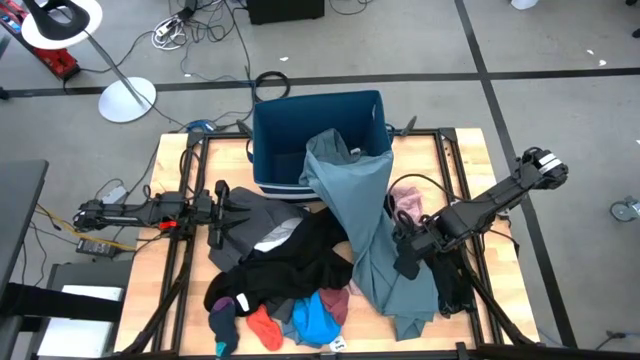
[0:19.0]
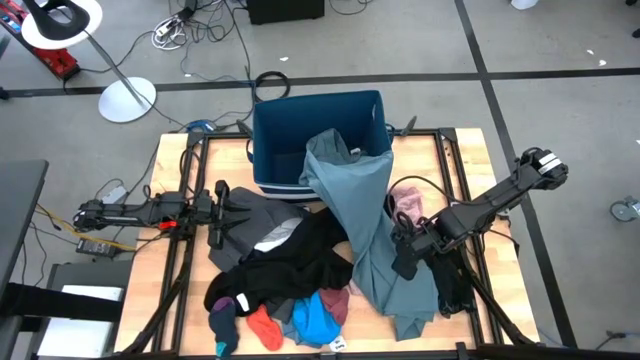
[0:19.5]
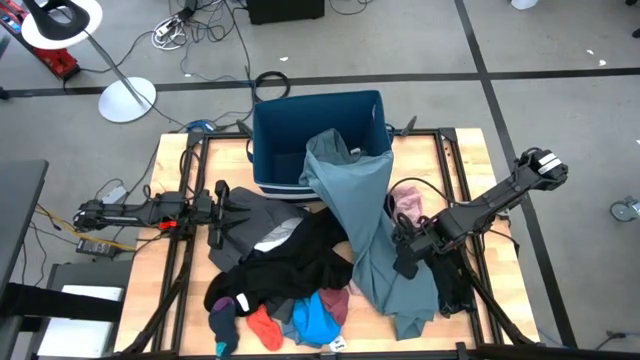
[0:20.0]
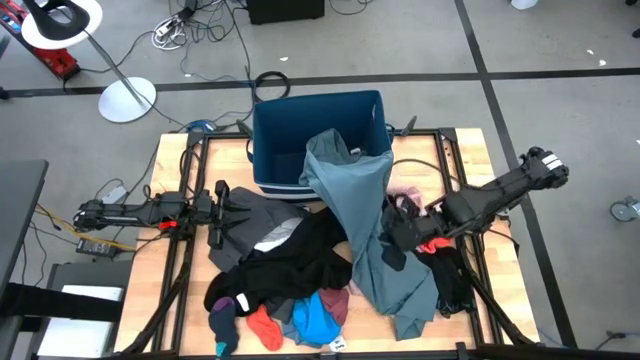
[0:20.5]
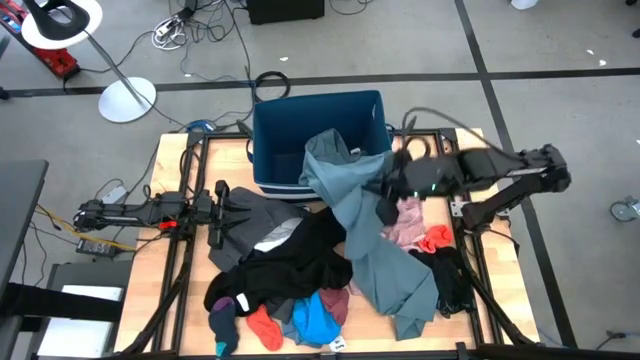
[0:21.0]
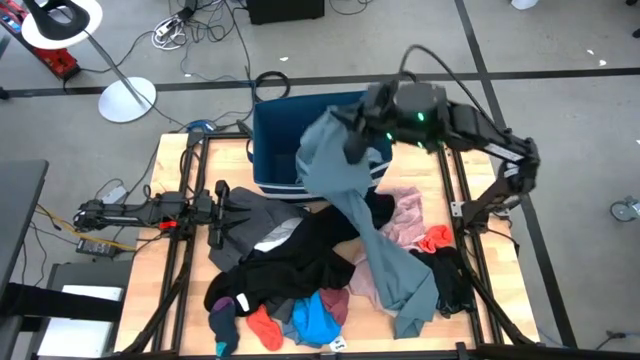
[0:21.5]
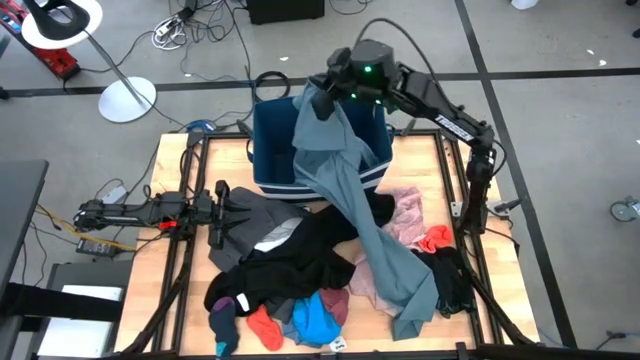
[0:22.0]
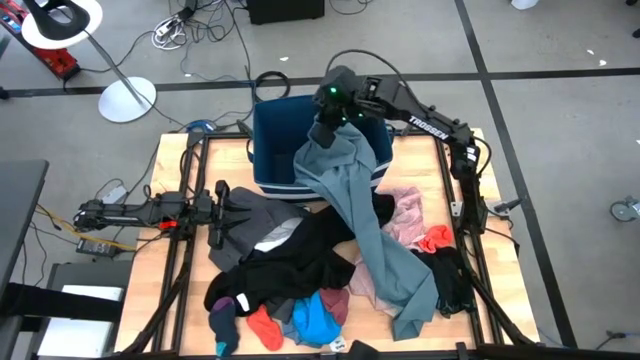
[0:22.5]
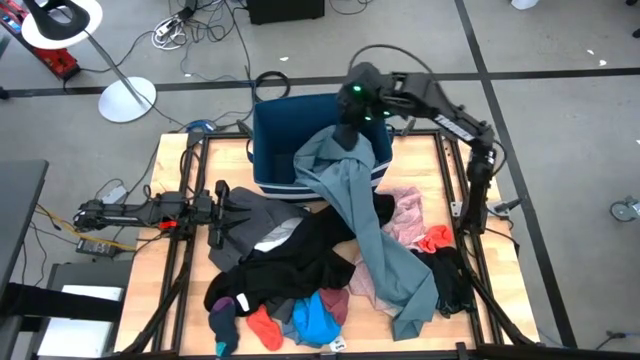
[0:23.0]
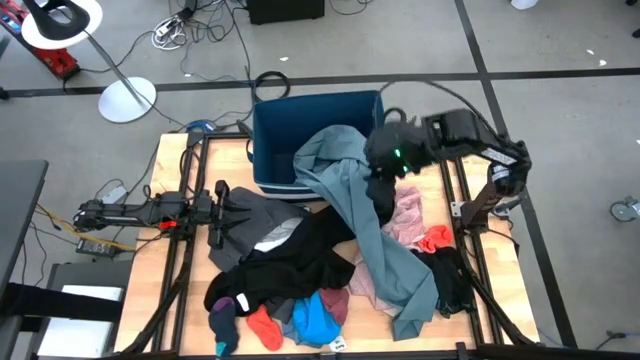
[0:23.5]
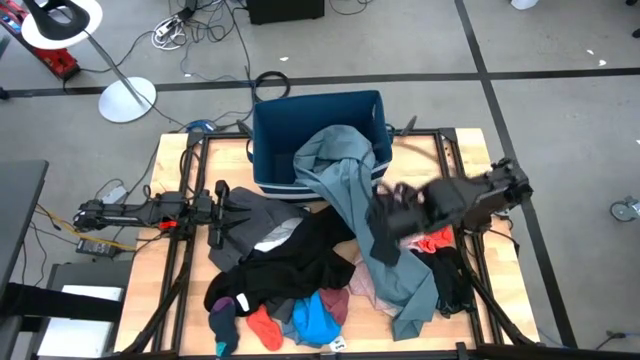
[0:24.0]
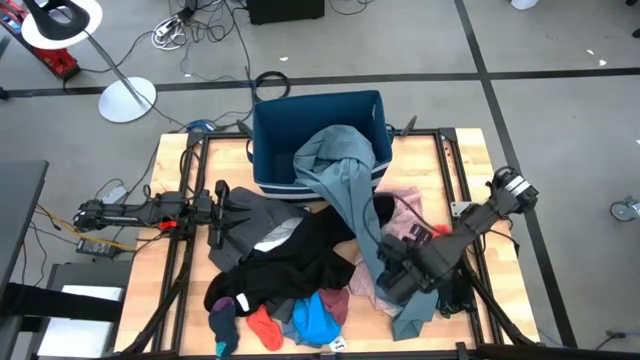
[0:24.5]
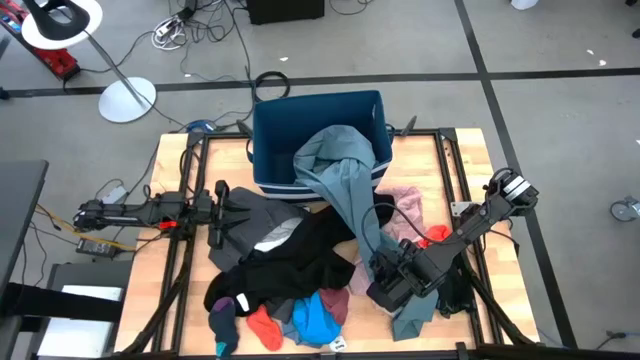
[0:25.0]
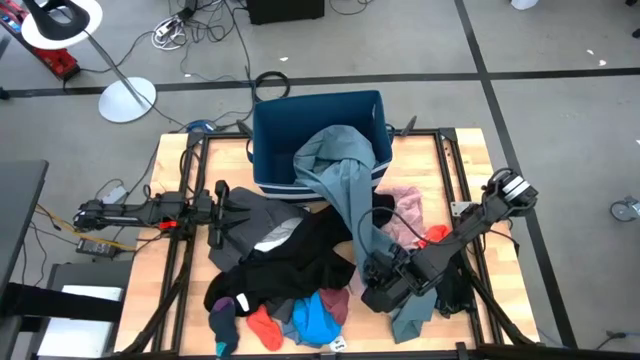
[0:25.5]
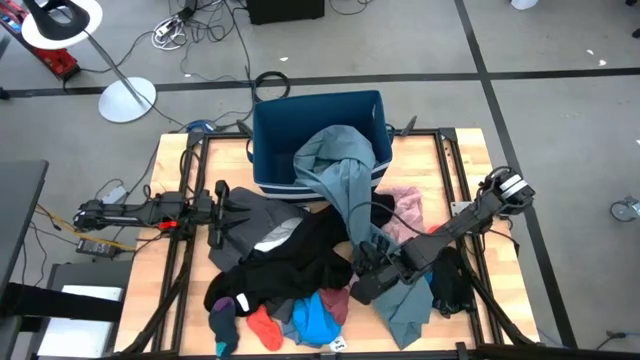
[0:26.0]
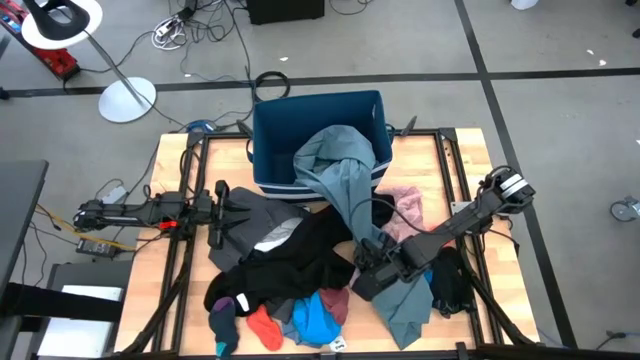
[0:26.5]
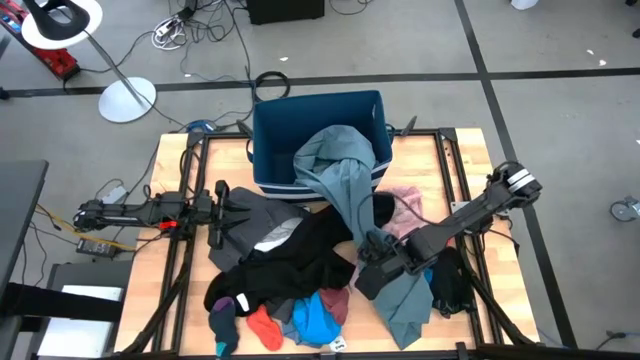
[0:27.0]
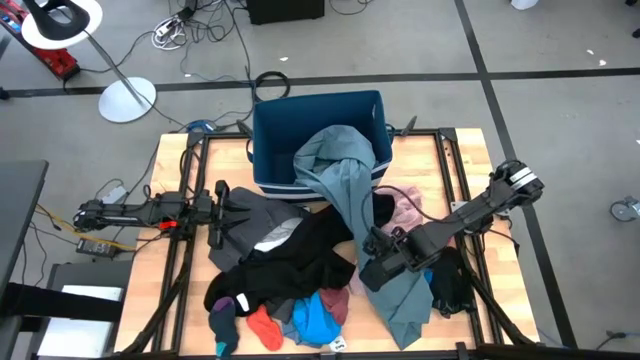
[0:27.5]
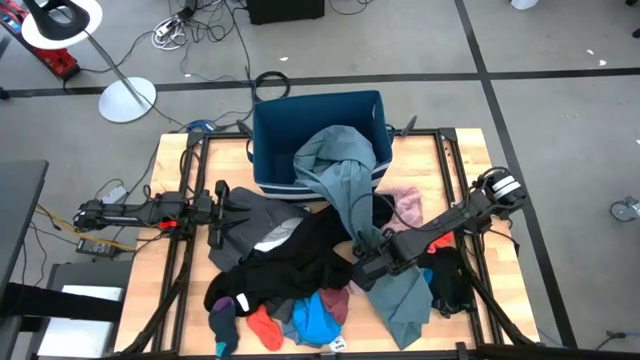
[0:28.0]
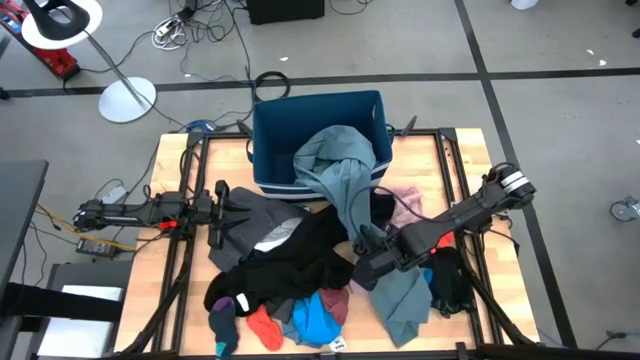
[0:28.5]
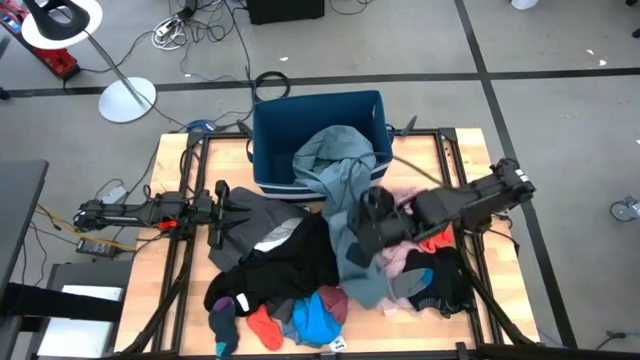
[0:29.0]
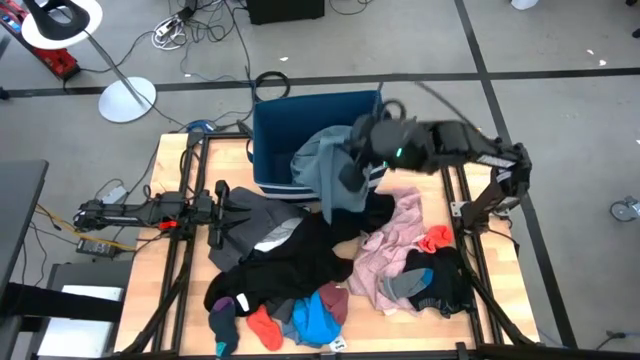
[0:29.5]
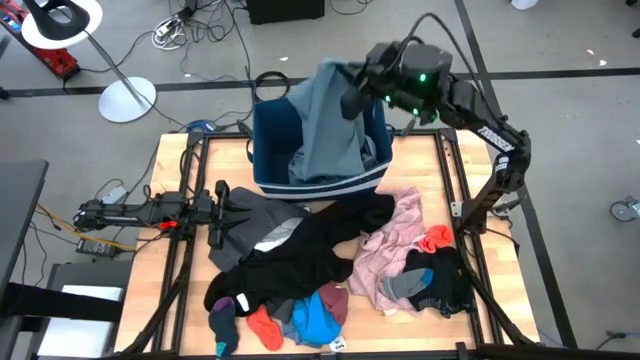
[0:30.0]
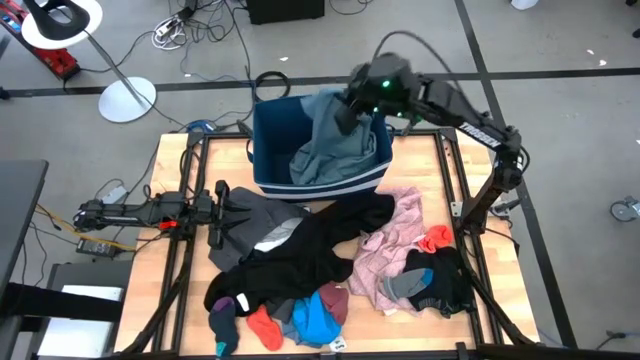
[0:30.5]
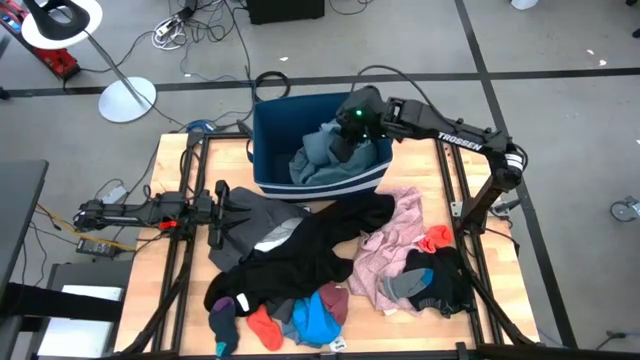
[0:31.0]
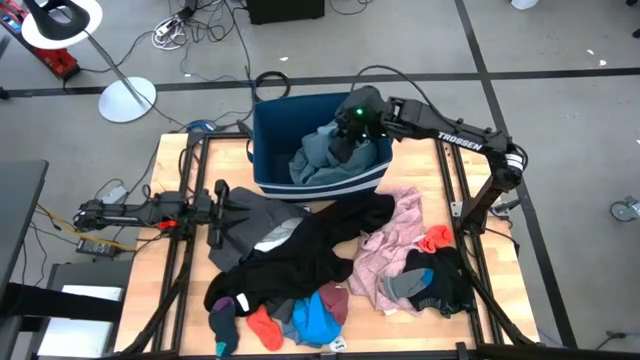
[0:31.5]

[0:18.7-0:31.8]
Task: Sort clothes
Put the blue pants into the laundry bin

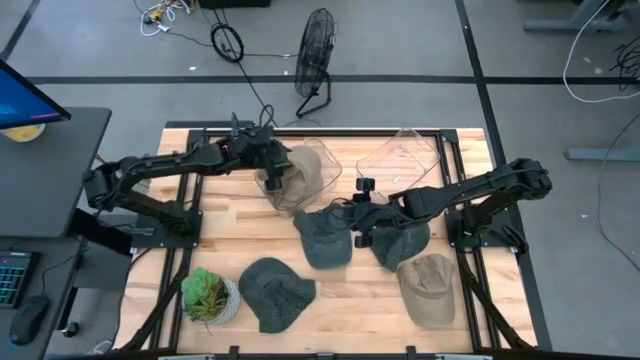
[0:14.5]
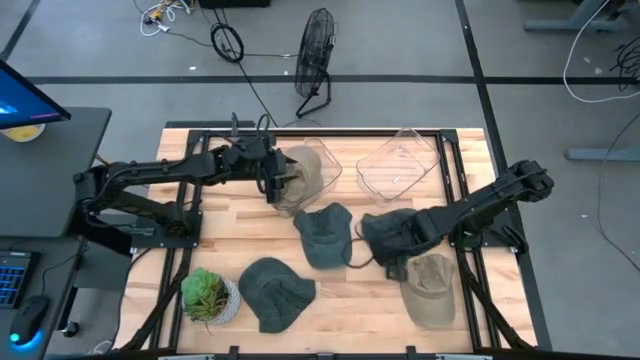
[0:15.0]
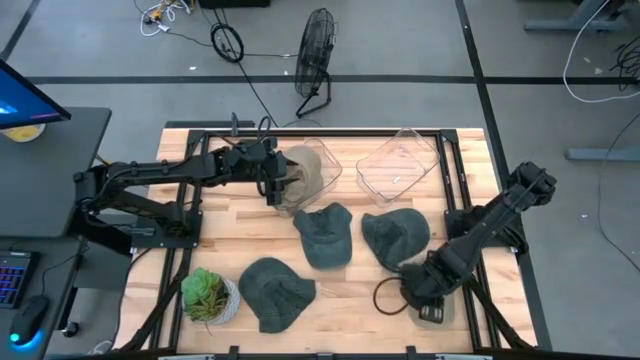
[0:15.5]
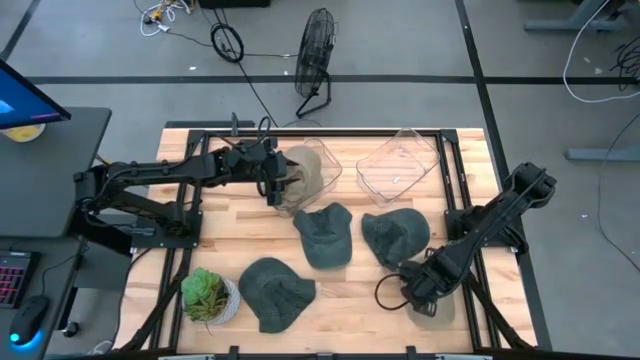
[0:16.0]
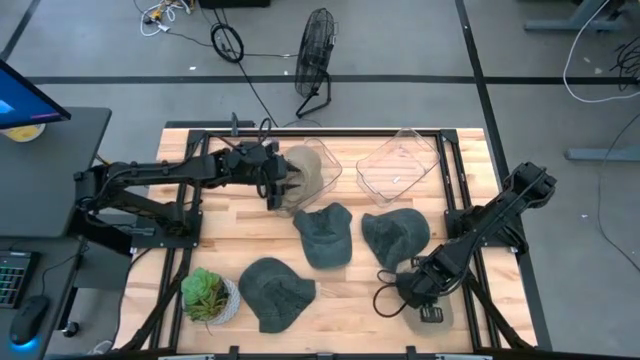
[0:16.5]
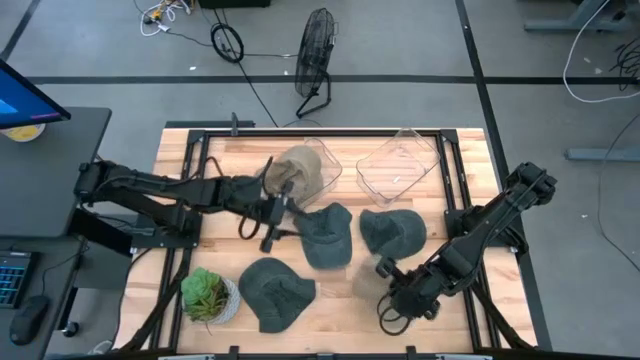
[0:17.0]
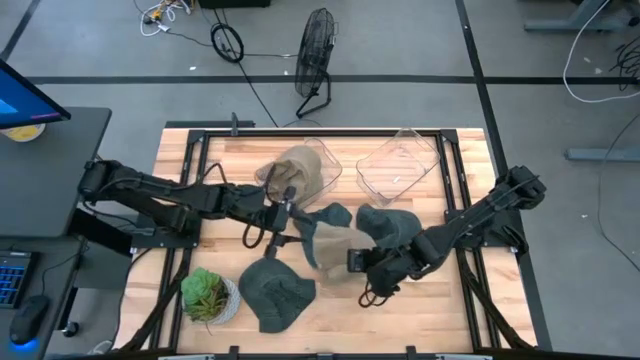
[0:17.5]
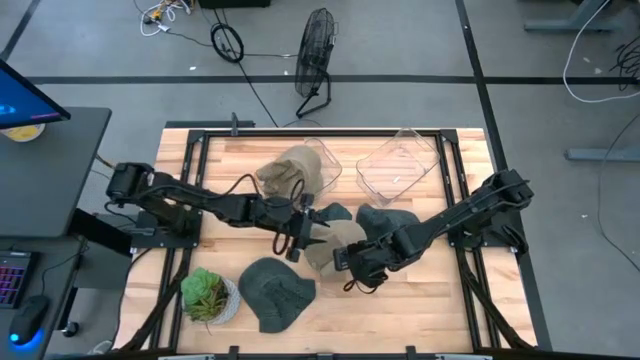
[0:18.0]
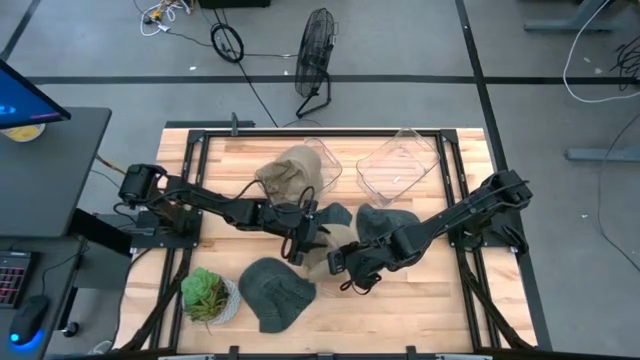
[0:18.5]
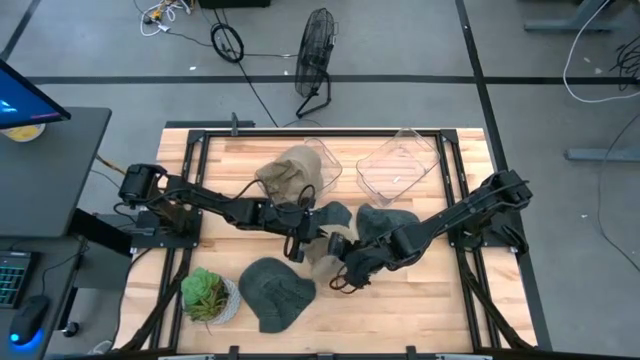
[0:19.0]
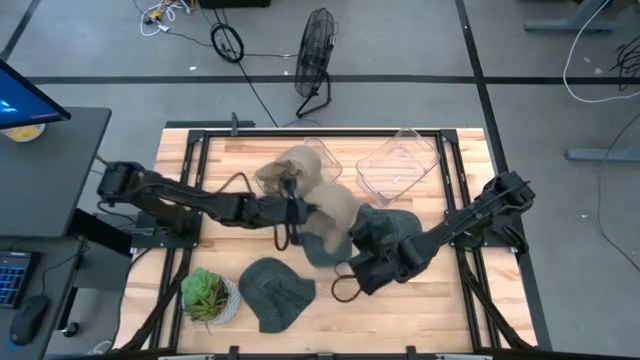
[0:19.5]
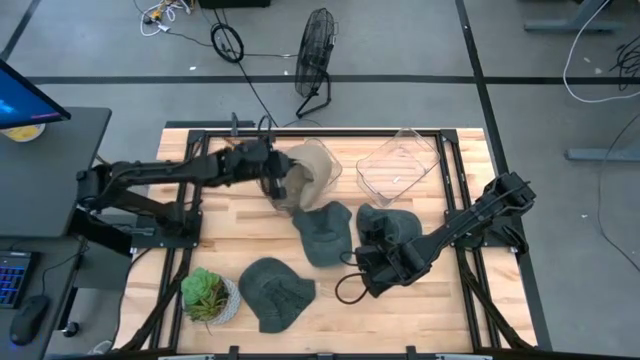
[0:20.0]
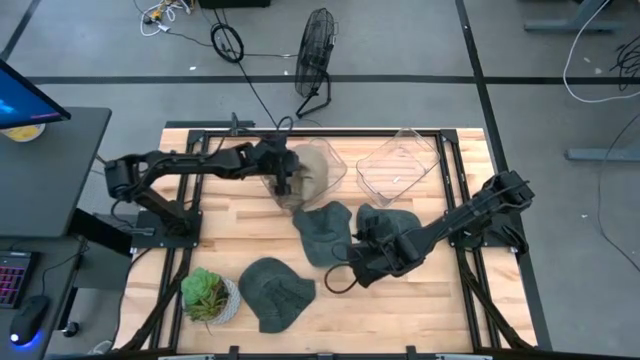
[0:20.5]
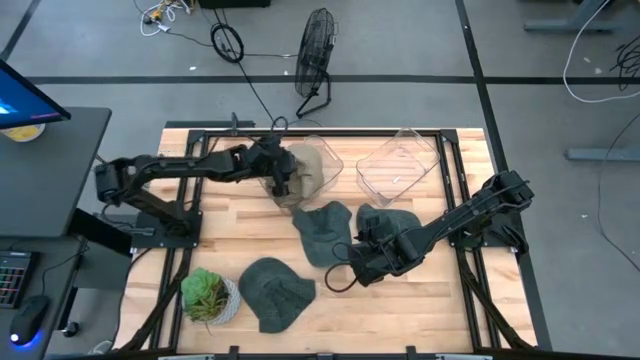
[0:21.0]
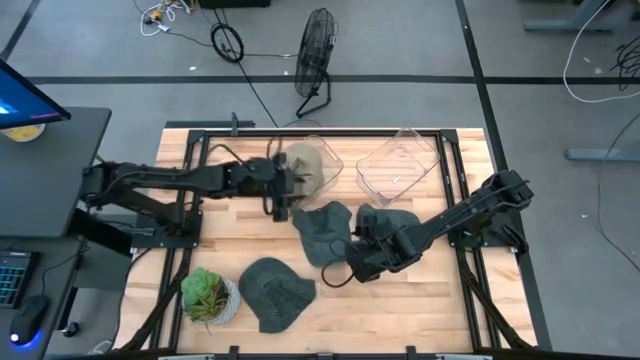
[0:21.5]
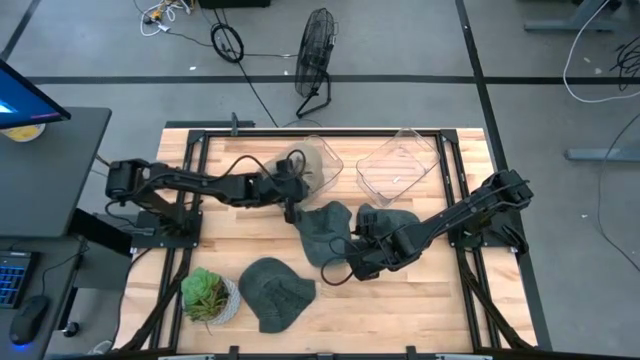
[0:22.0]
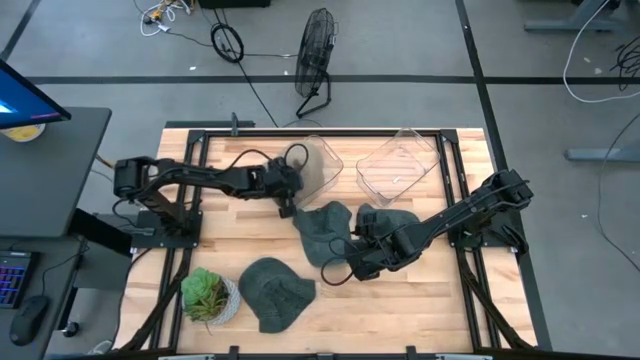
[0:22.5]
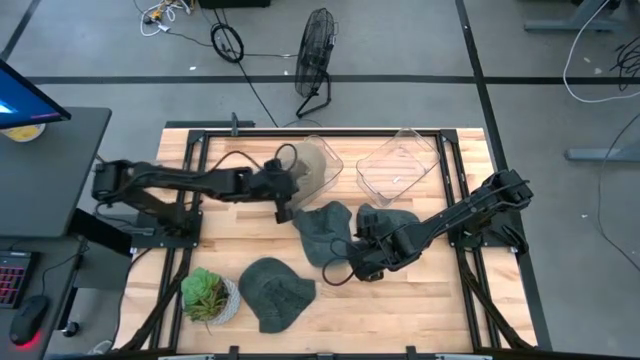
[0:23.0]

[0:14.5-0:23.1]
Task: Pick & Place hat
Put the brown cap into the left transparent bin
